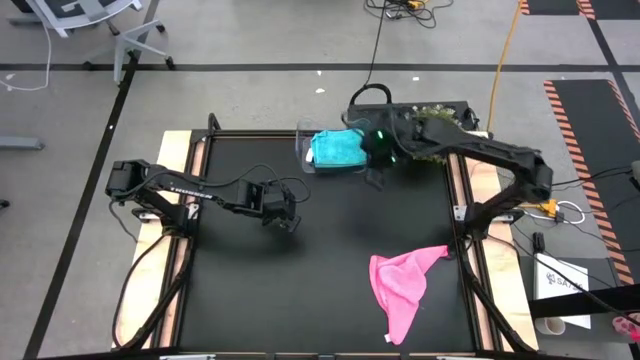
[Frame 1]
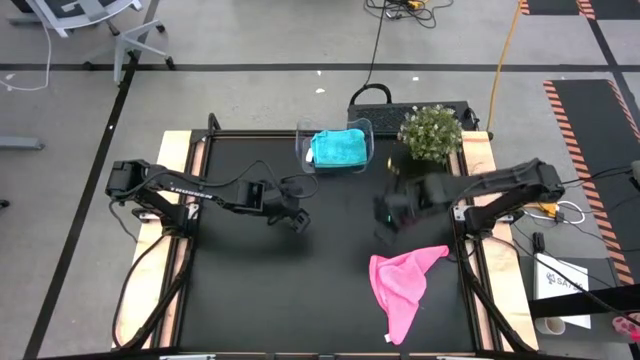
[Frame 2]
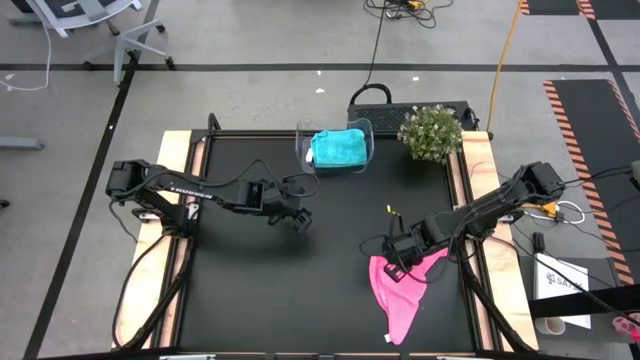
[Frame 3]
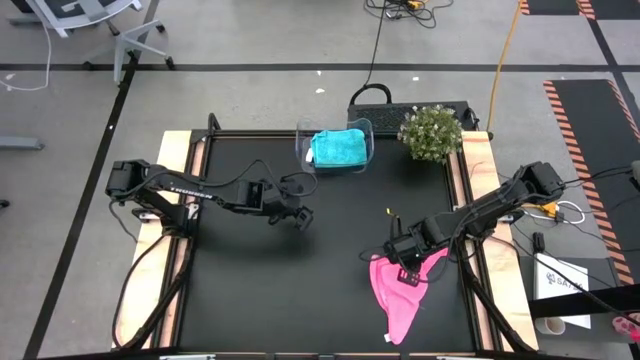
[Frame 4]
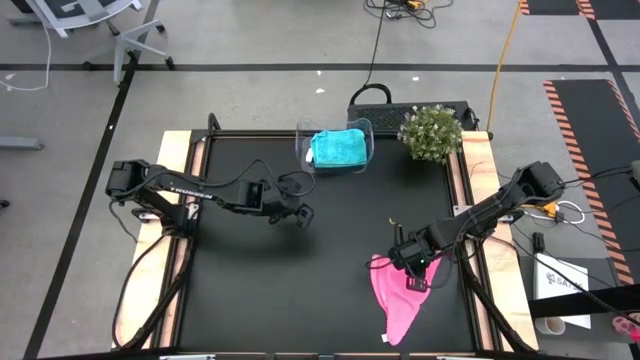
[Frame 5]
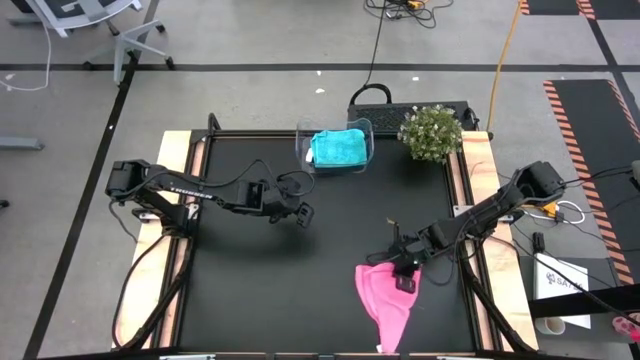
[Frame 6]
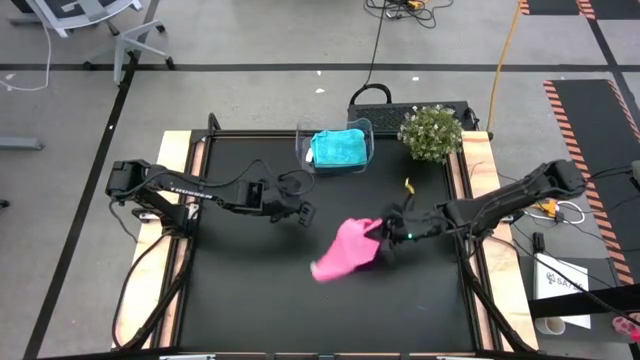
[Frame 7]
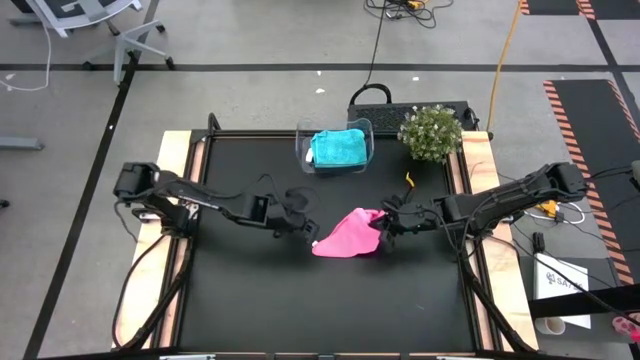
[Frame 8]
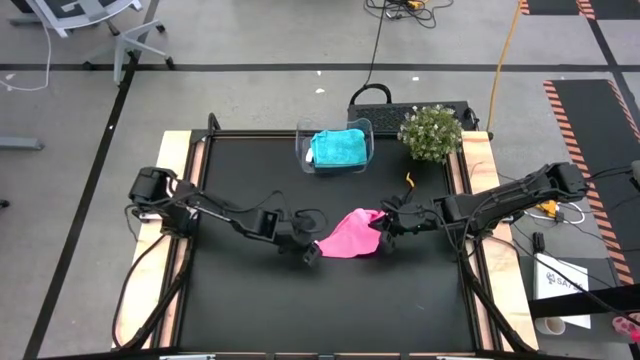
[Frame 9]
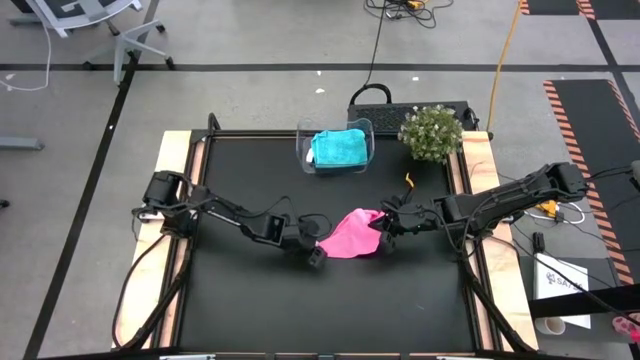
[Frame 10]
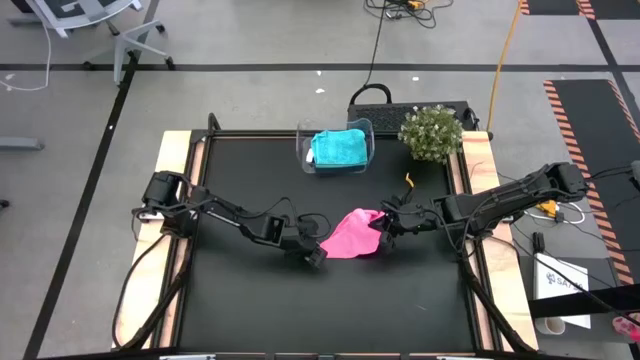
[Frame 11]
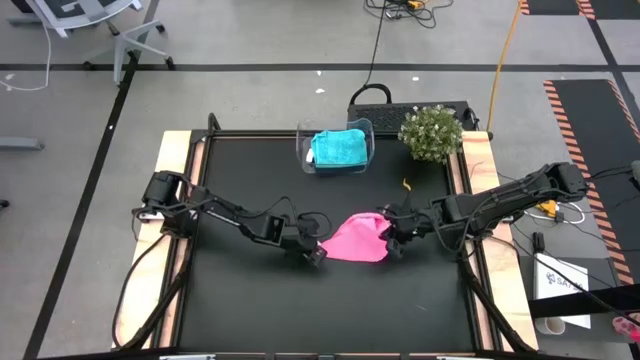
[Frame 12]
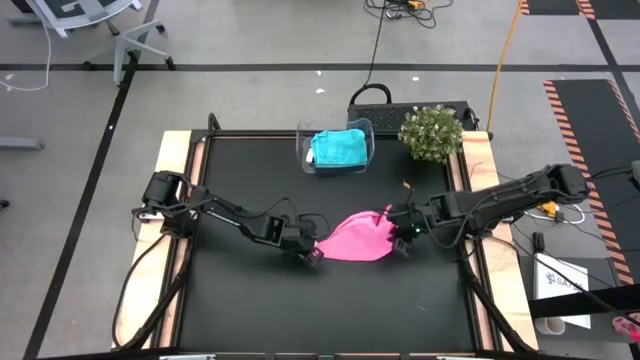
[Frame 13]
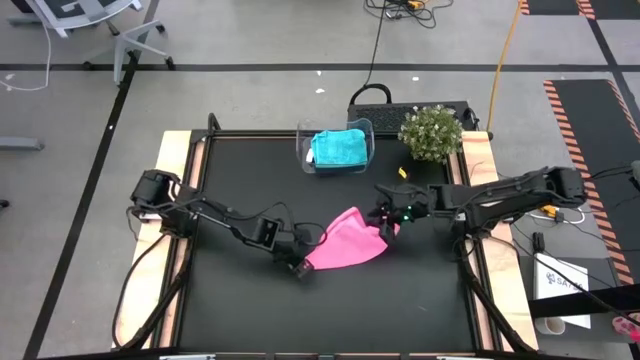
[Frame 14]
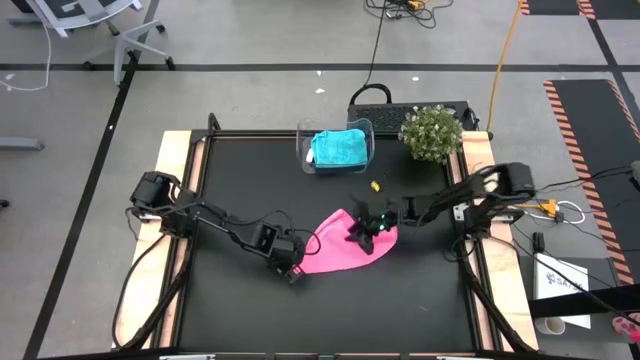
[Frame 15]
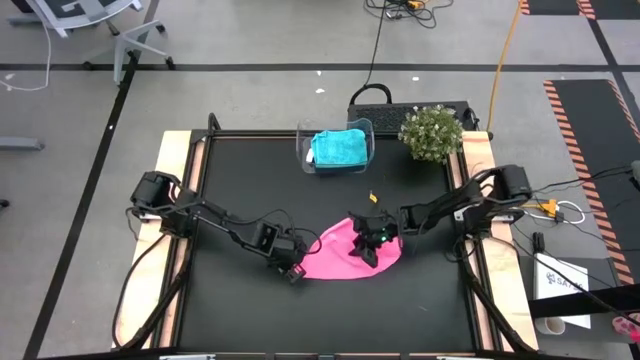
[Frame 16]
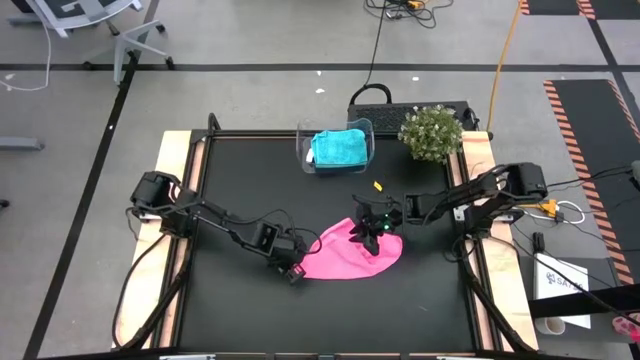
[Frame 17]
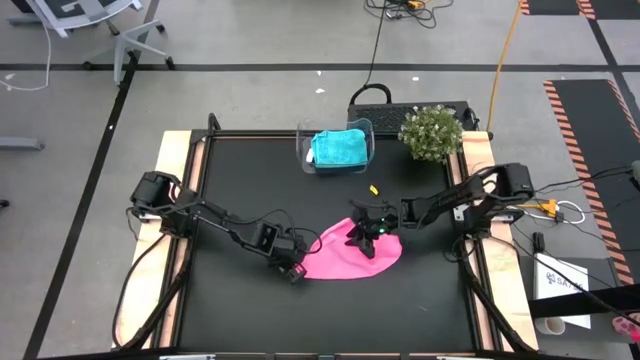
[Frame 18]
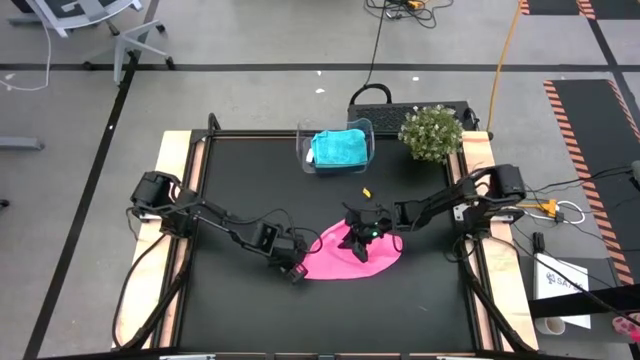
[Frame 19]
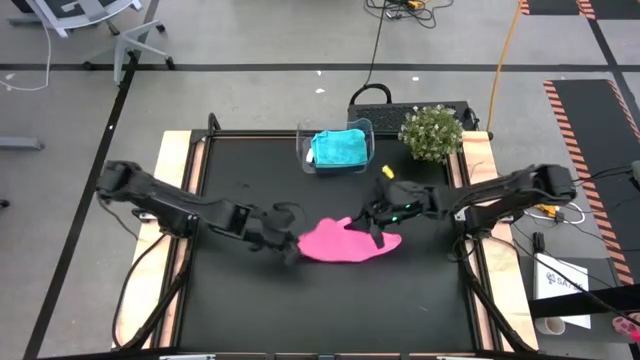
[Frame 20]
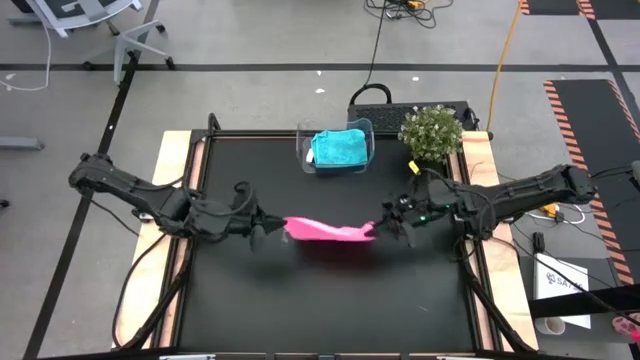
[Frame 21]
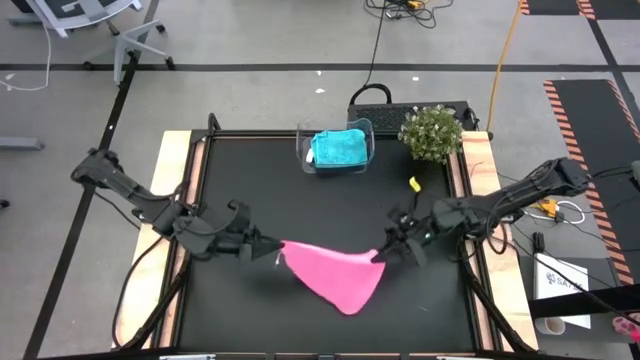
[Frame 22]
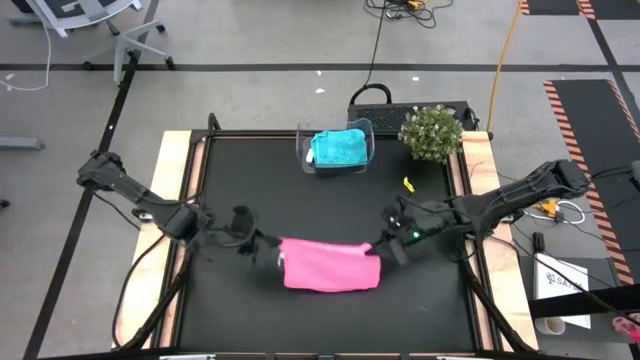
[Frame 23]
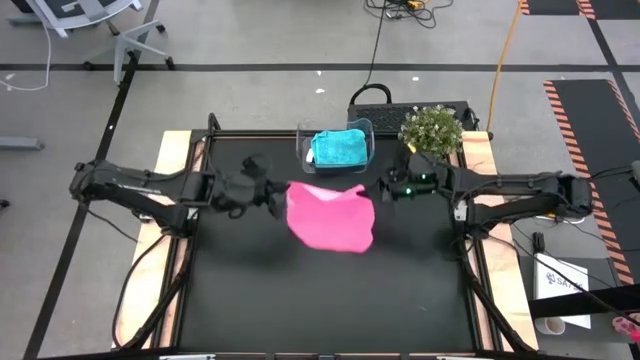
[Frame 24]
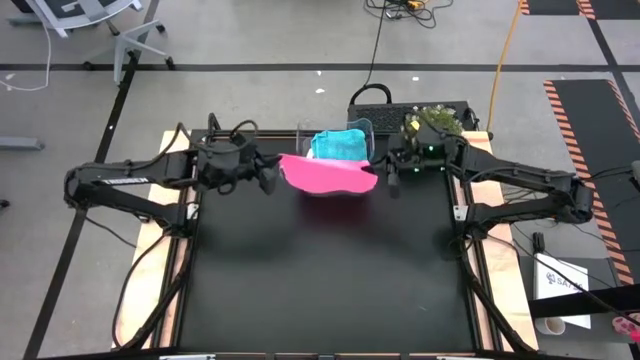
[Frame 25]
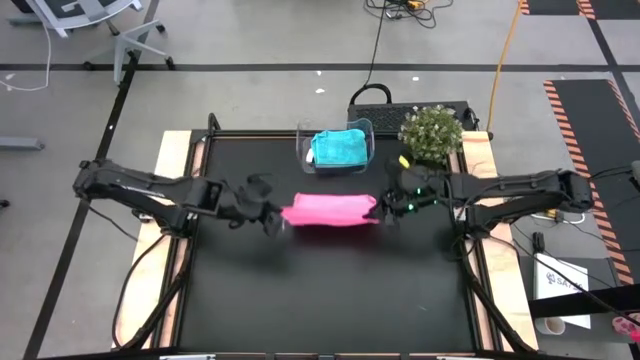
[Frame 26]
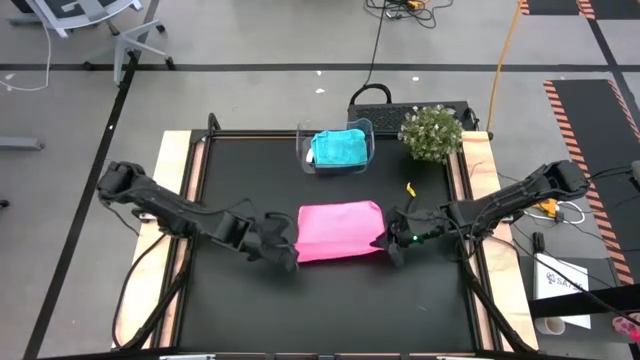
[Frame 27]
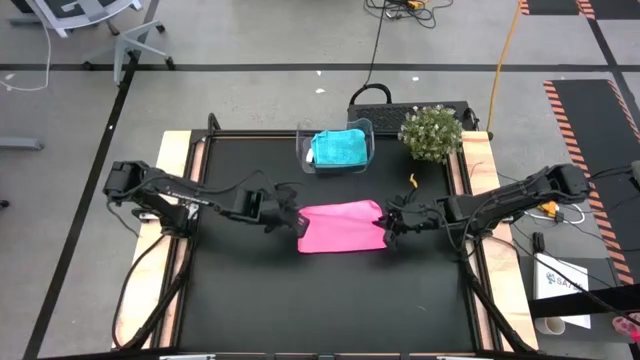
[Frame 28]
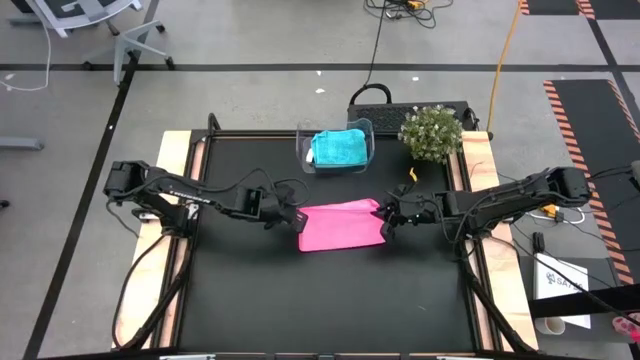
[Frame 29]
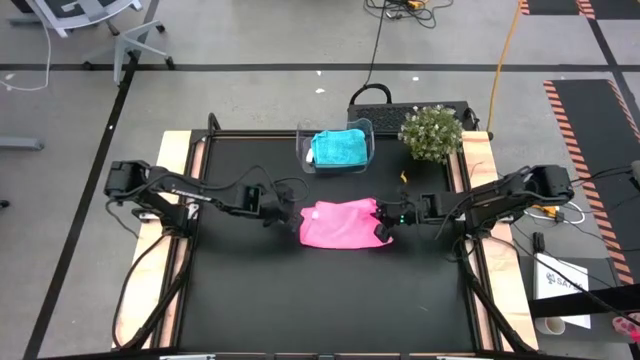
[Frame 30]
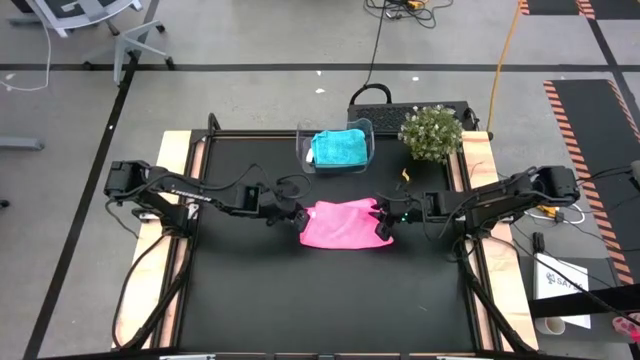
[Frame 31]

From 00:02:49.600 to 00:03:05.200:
Task: Fold microfiber towels
Fold the pink microfiber cloth

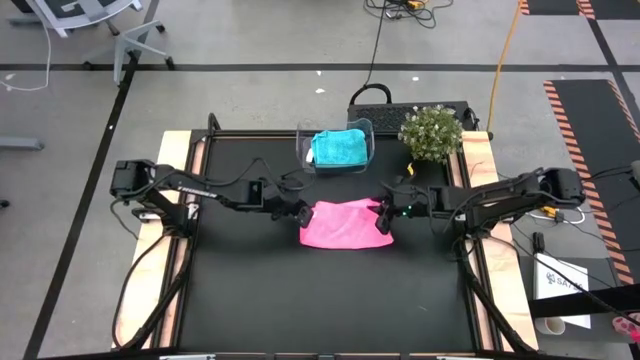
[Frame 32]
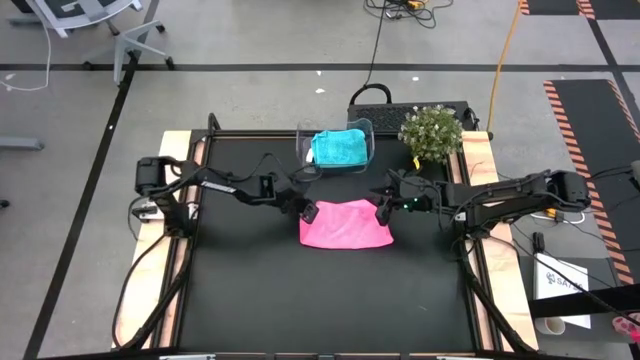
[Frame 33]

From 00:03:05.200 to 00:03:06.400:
Fold the pink microfiber cloth

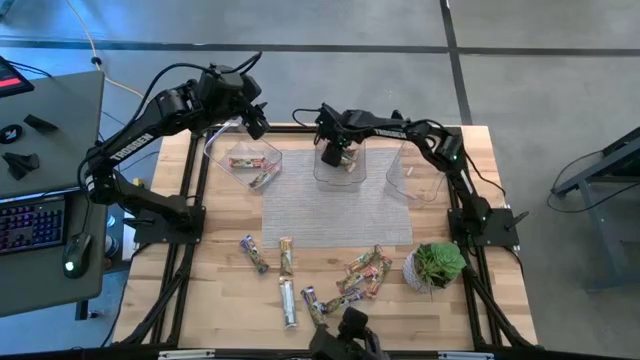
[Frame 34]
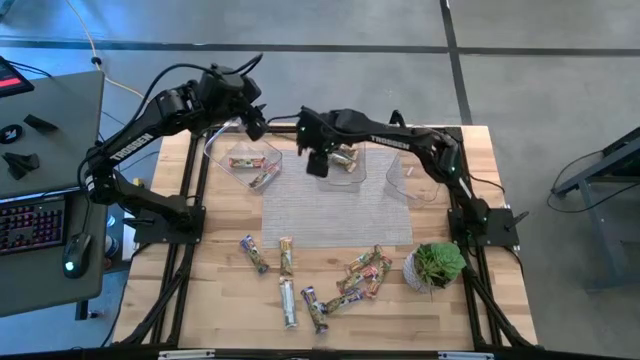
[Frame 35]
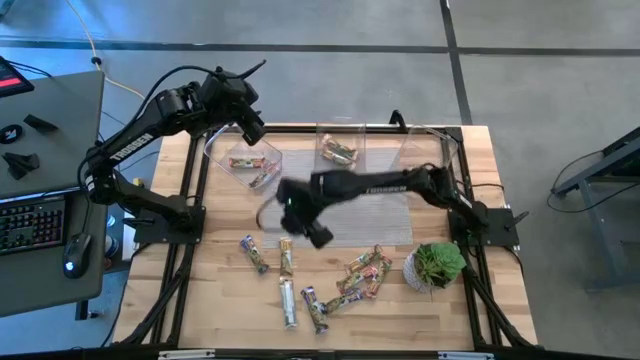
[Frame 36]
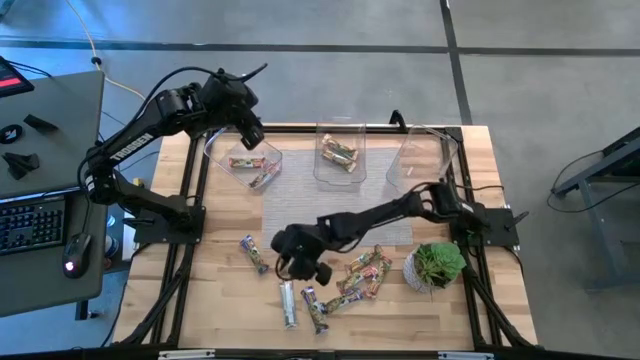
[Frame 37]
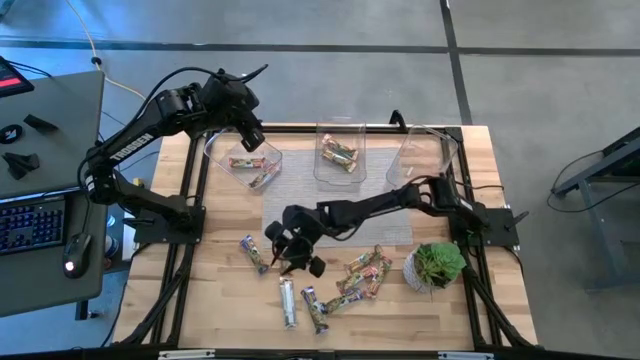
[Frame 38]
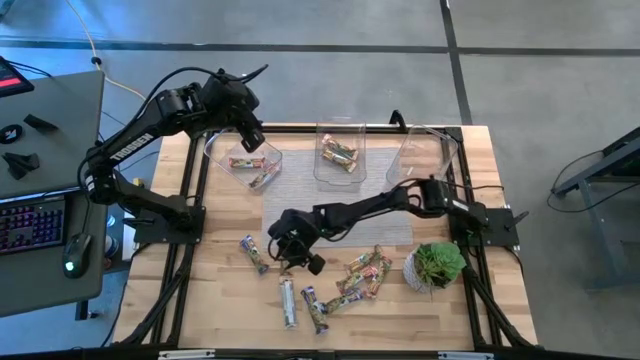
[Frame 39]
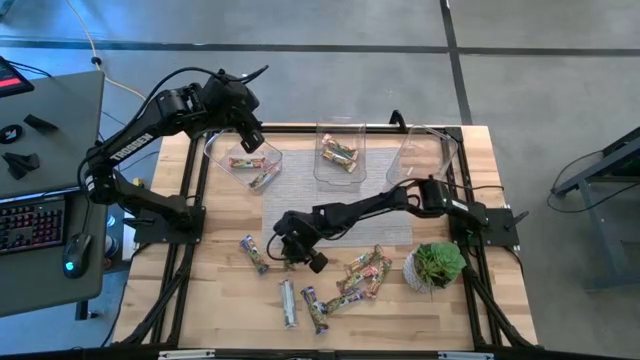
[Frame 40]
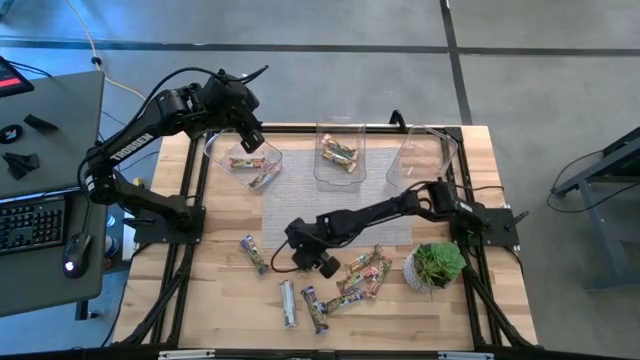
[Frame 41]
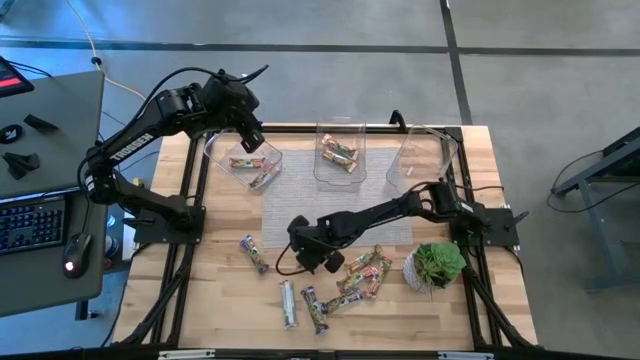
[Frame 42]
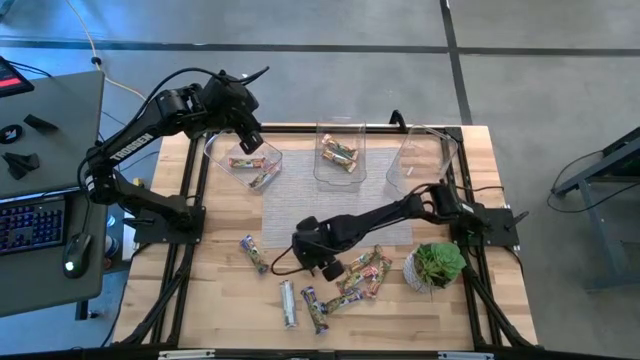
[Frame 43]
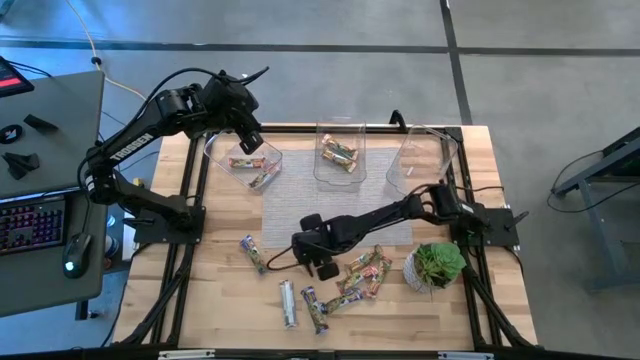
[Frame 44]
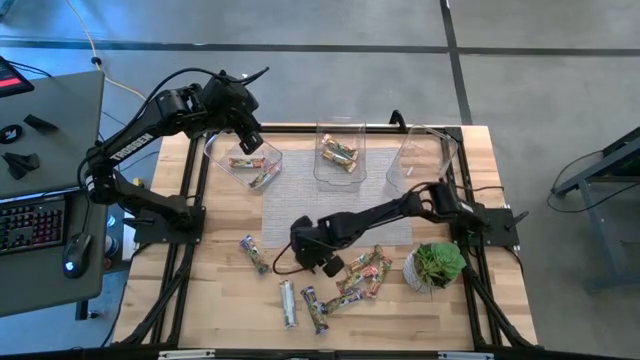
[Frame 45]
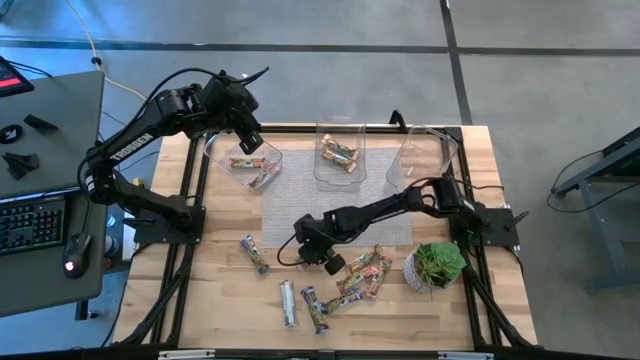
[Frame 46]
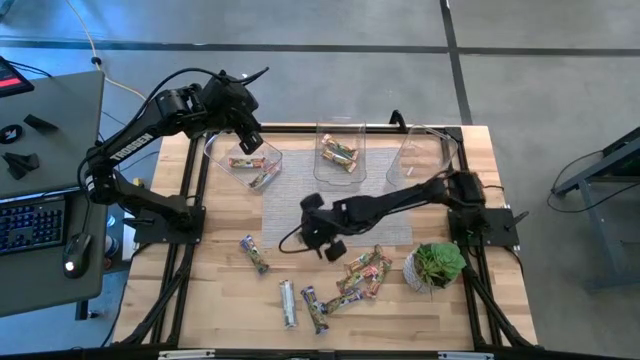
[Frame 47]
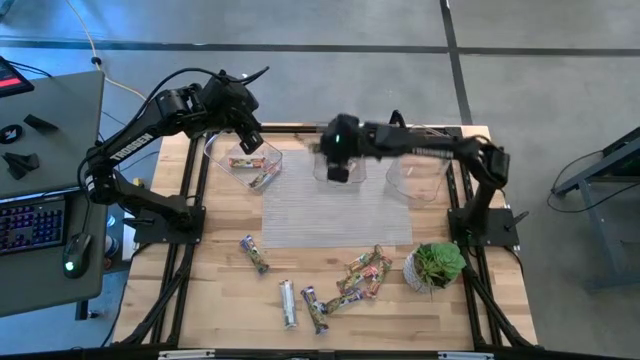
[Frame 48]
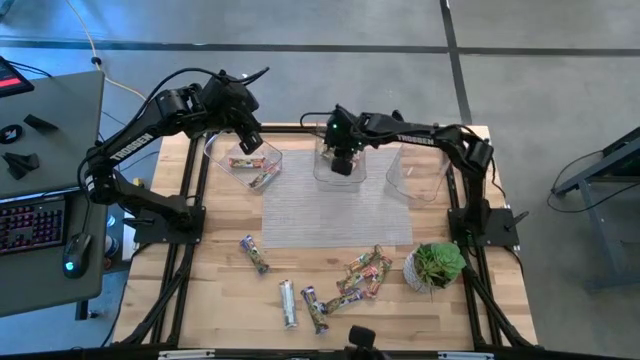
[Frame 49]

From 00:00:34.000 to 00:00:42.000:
Task: Pick and place Granola Bars by type
Put the yellow granola bar into the middle transparent bin
